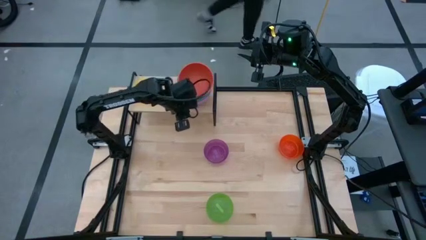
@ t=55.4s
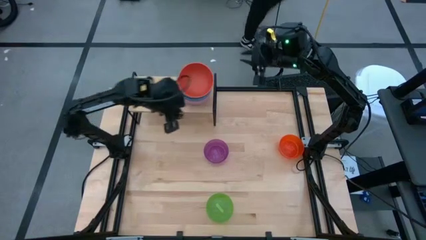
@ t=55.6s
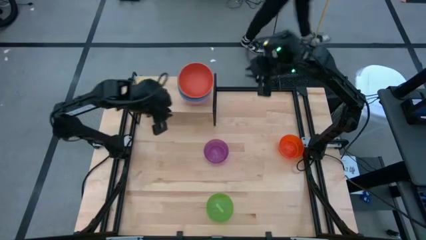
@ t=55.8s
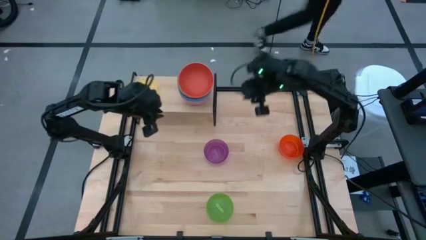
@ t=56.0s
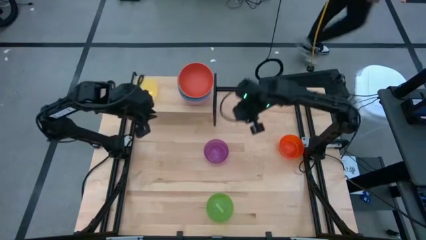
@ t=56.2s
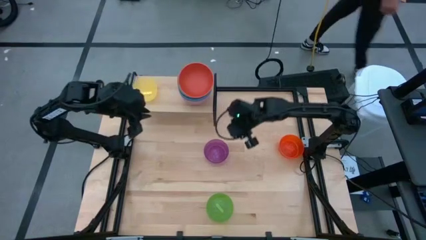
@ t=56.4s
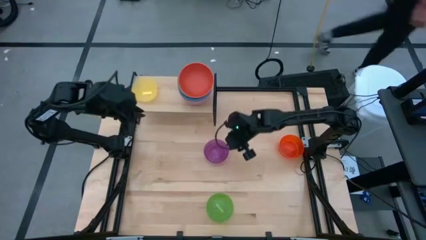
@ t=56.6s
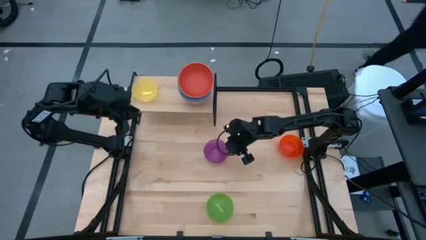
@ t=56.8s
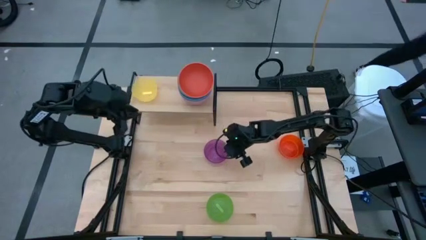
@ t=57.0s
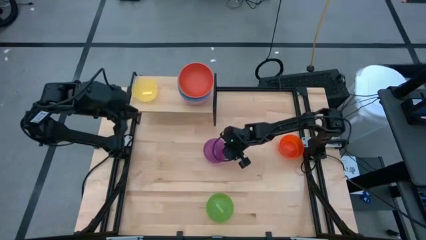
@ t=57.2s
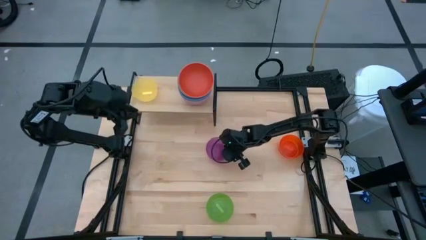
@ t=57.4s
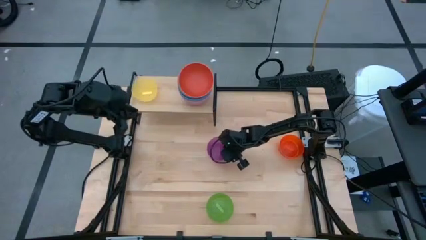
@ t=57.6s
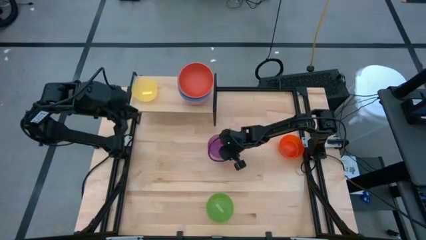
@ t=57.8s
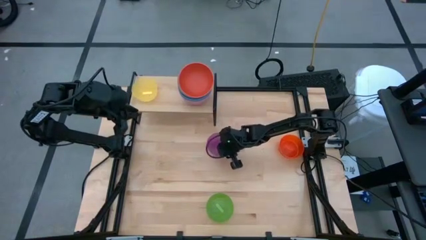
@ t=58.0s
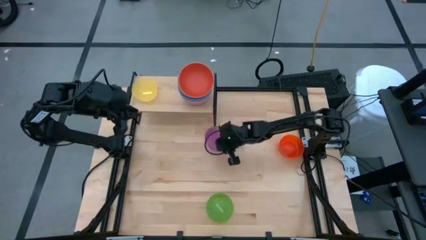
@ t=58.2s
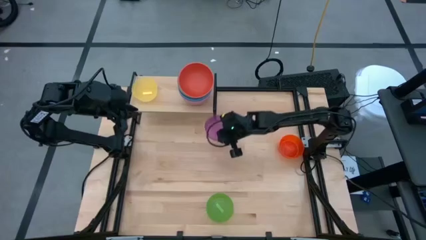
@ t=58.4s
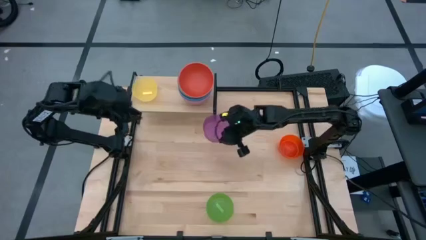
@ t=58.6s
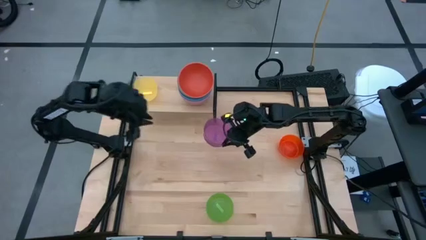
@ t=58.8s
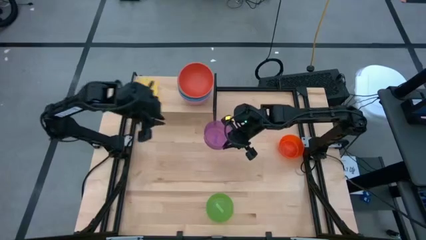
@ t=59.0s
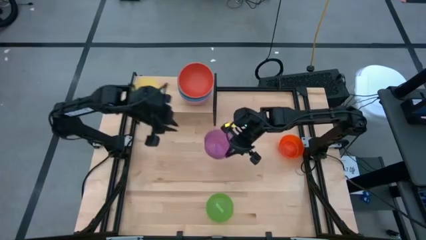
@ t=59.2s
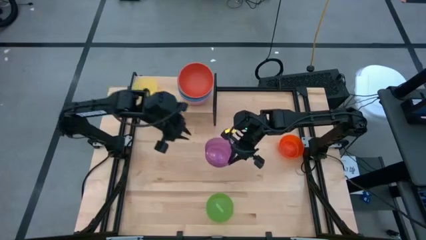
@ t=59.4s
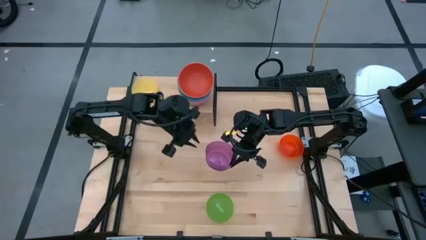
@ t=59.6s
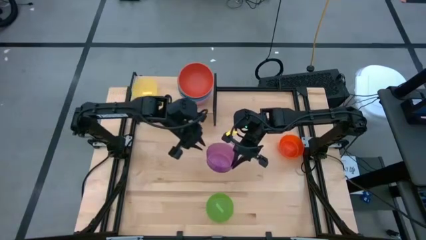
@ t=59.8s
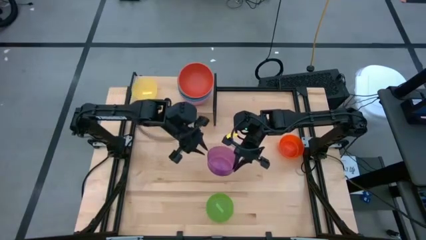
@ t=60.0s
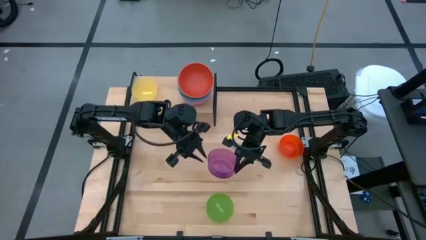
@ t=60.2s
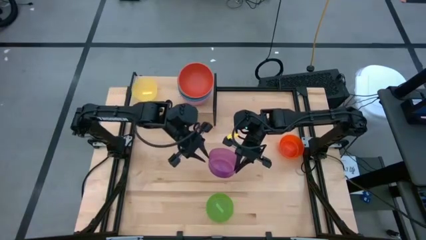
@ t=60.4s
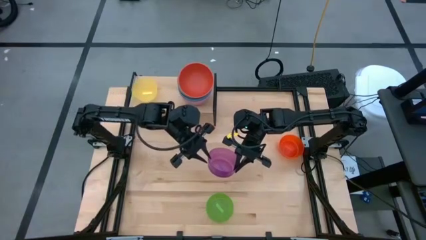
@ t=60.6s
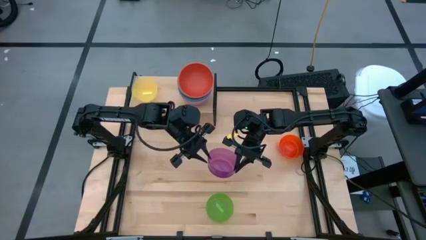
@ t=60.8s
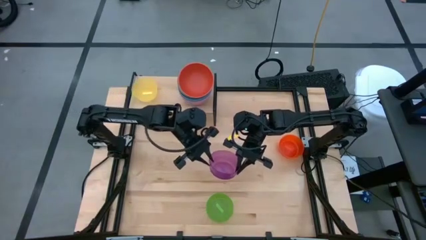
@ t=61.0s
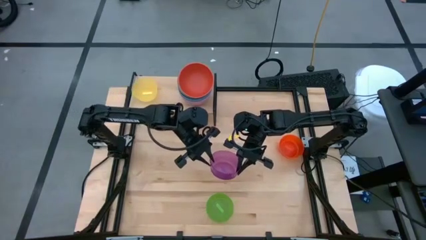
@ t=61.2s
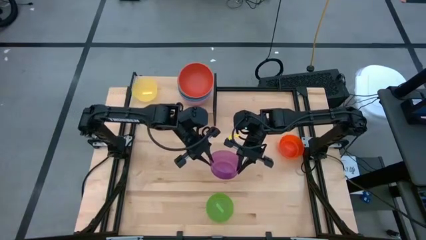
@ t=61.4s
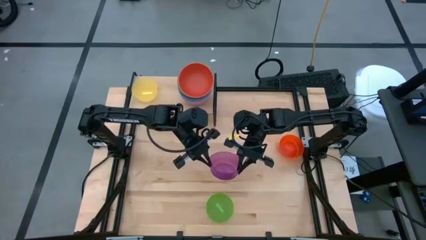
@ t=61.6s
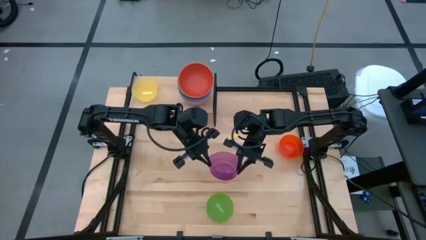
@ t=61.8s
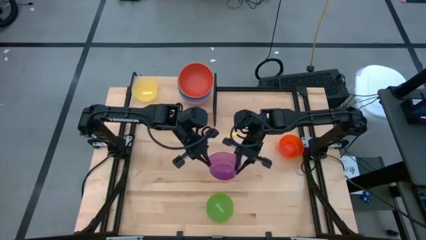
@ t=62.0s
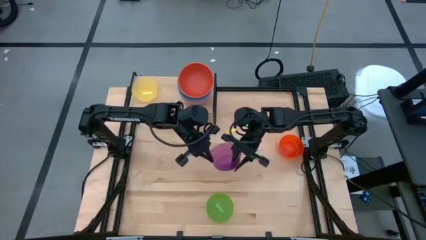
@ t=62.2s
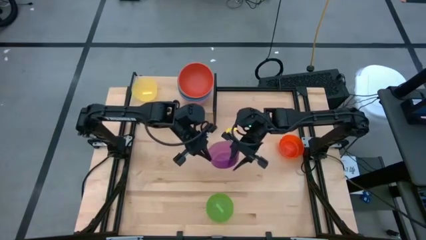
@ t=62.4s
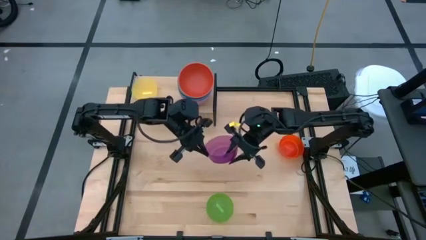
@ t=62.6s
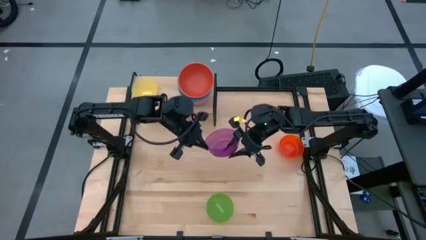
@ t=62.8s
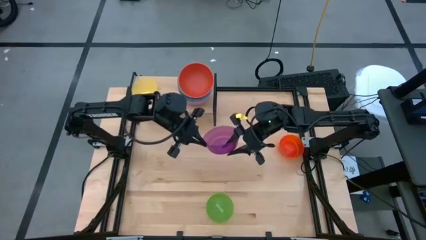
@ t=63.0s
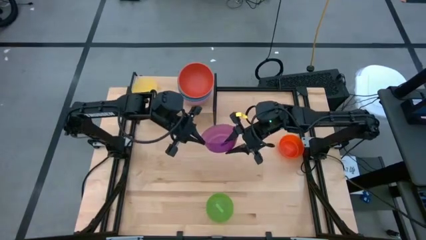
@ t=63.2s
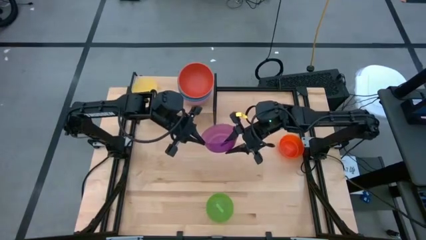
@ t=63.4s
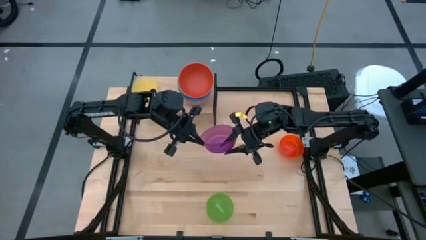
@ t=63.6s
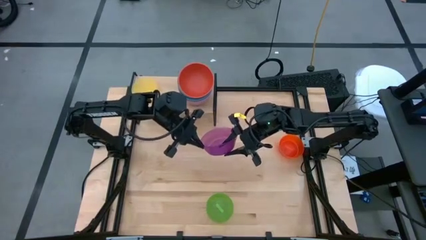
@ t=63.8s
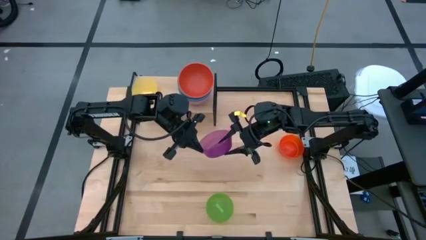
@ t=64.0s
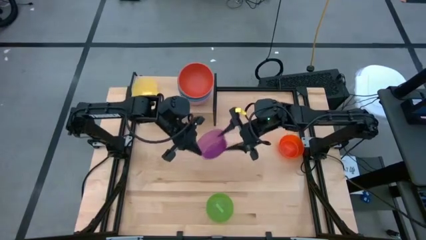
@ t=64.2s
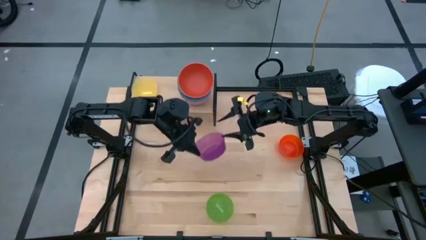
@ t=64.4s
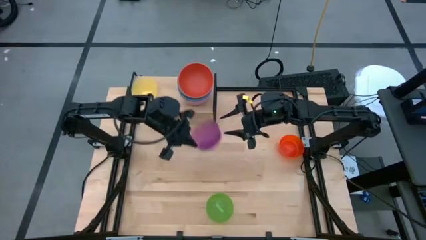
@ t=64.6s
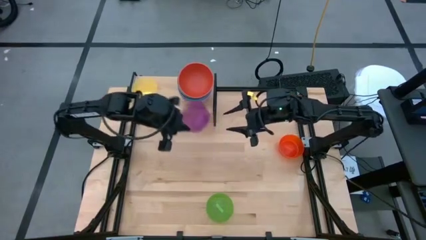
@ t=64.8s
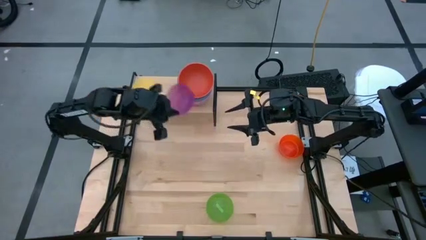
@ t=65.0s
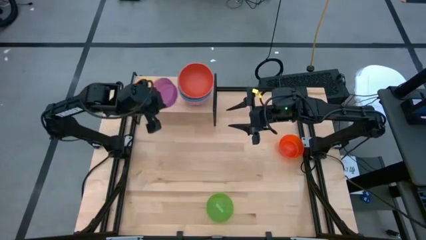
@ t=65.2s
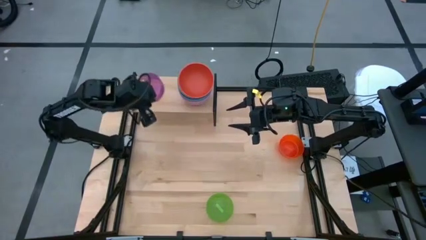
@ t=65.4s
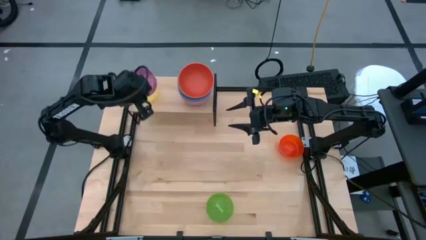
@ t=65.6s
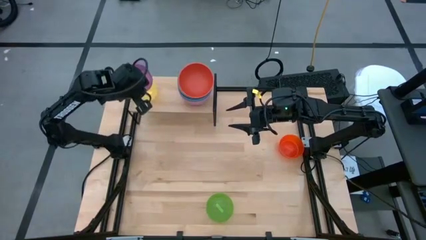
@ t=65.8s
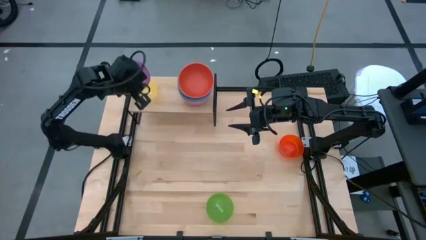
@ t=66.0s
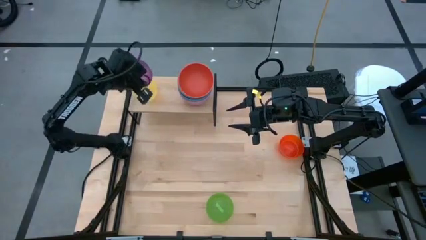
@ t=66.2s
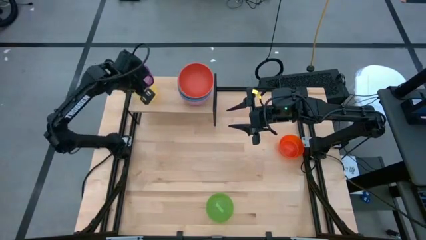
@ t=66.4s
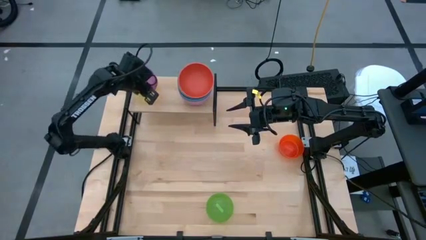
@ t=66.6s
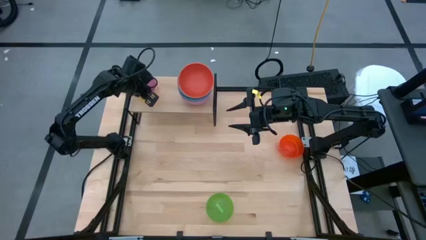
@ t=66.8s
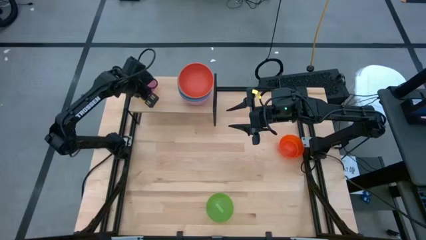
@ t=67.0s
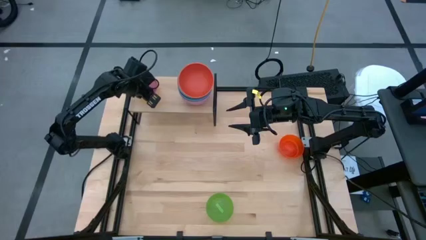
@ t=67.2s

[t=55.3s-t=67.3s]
Task: Place and stack bowls onto a shelf
Stack the purple bowl on the yellow bowl on the shelf

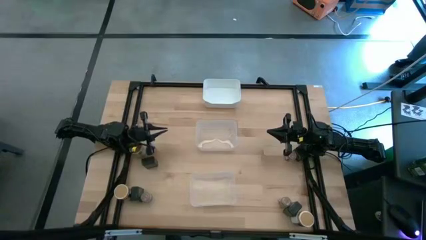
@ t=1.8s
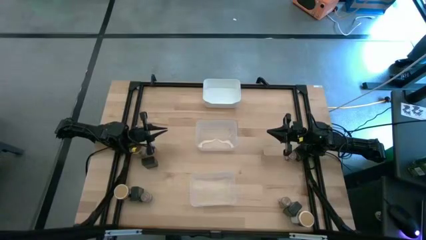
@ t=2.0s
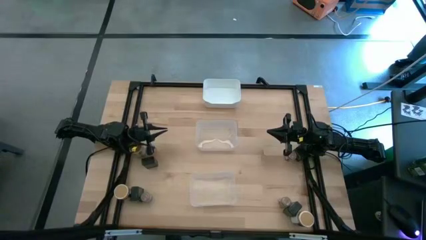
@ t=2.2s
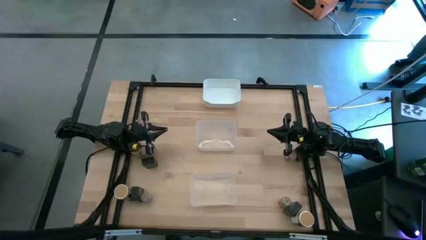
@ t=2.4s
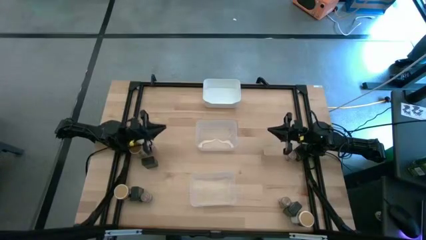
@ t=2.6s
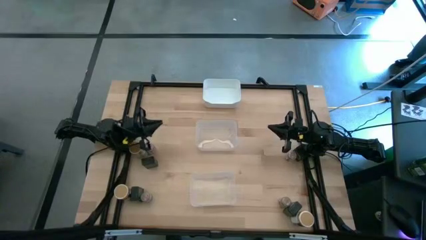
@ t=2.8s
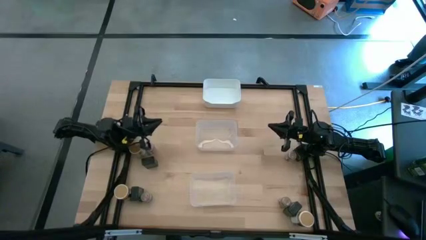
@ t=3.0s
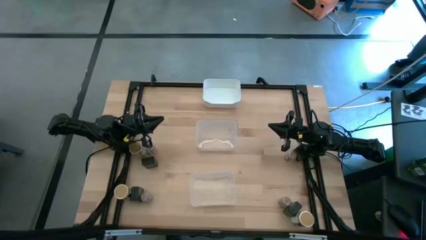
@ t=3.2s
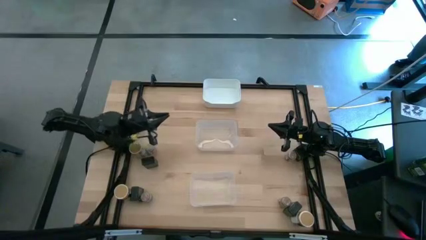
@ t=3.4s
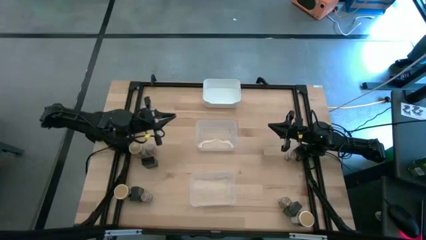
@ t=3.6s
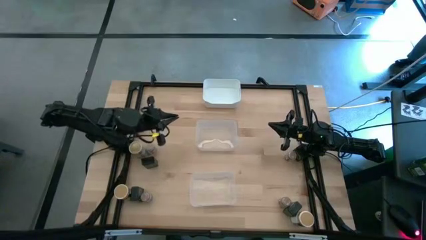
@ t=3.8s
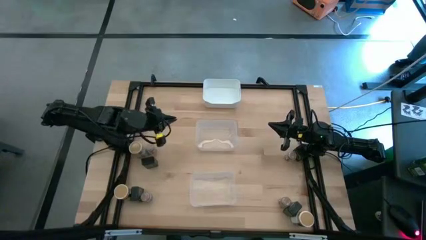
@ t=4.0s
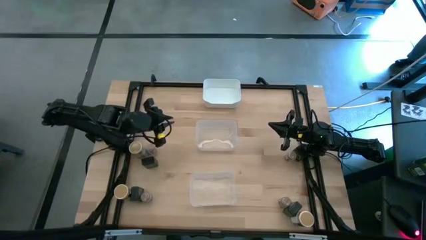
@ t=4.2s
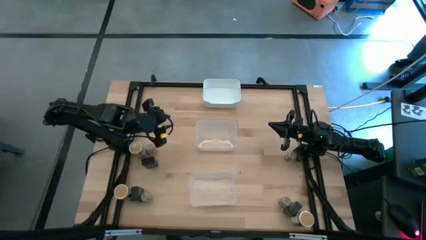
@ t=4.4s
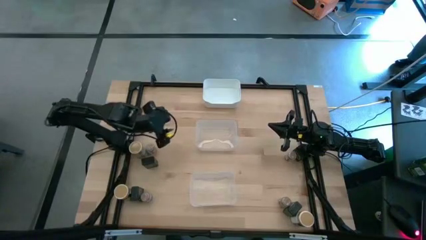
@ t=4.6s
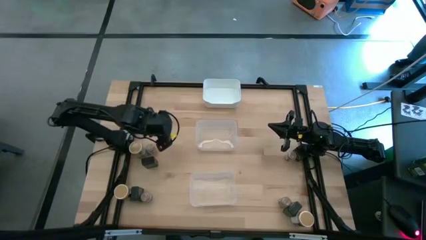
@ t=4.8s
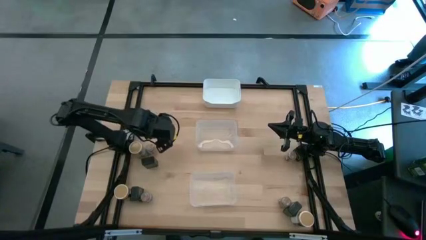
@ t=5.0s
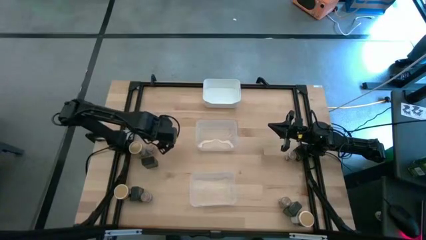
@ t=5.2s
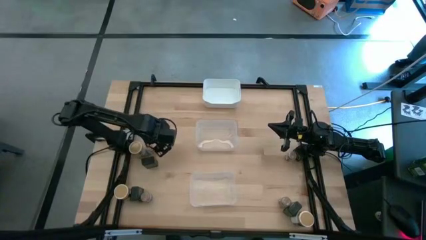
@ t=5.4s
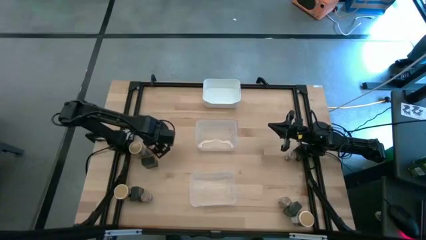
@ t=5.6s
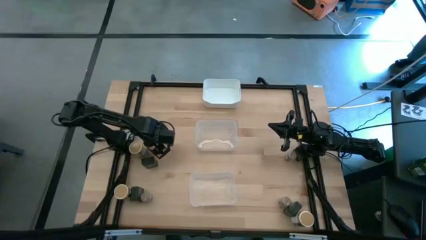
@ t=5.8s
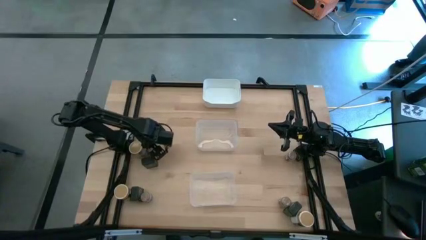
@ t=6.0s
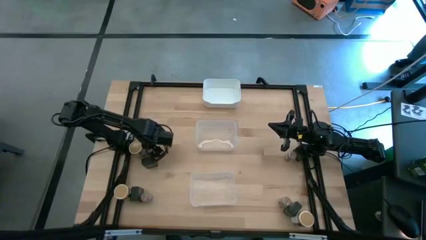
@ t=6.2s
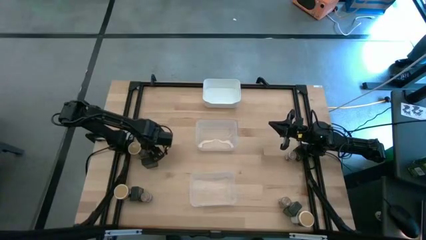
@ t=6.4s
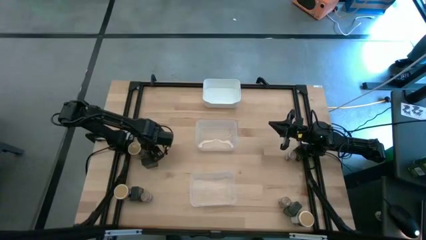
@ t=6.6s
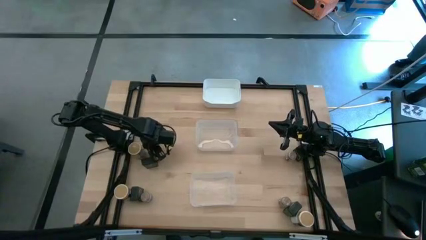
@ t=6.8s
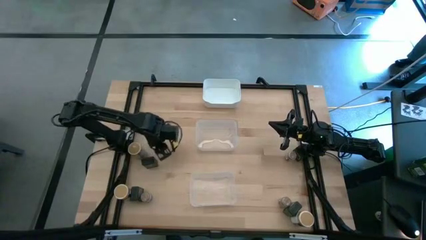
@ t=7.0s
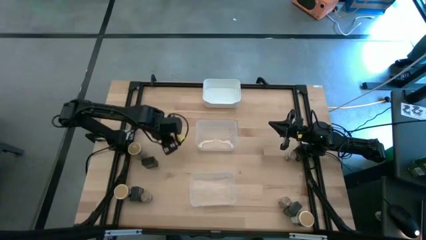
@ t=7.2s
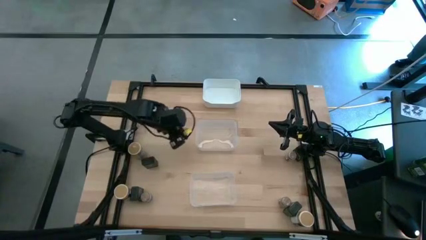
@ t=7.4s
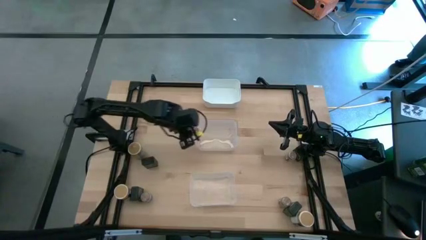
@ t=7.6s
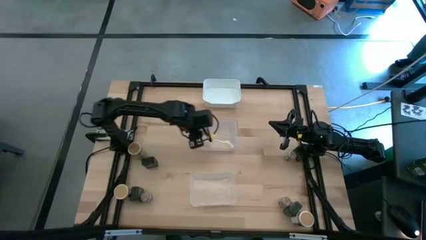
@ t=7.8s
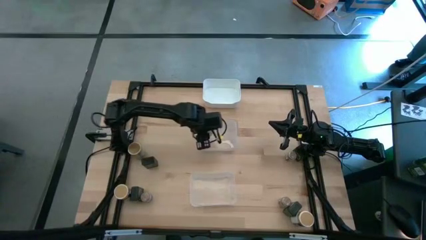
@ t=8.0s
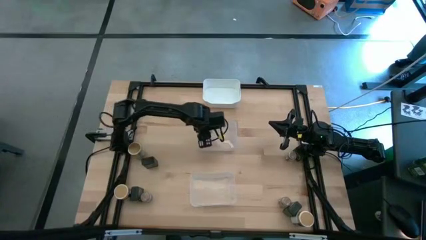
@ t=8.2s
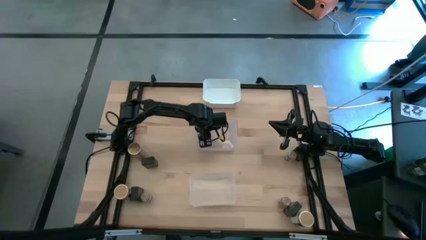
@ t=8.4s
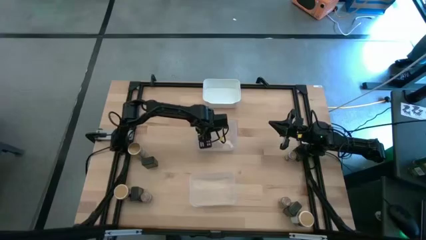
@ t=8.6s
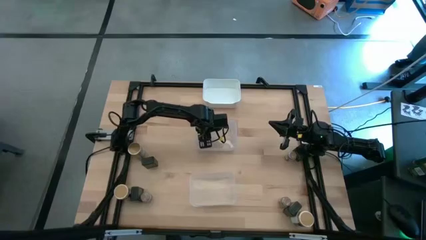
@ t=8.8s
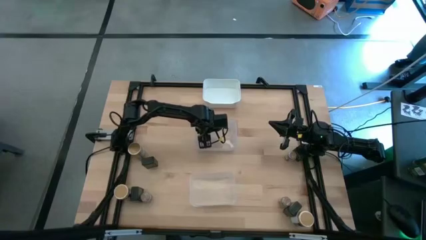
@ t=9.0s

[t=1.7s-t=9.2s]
Task: Sort spices by type
Put the top left small brown seasoning bottle into the top transparent bin
